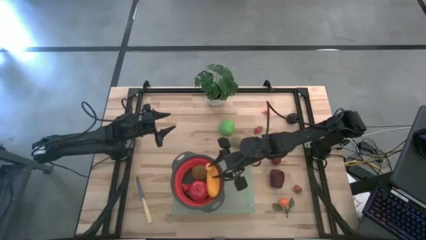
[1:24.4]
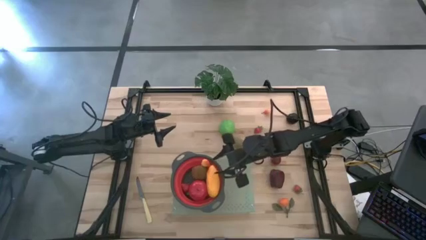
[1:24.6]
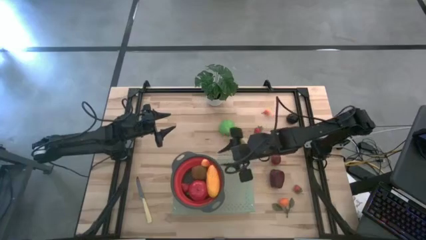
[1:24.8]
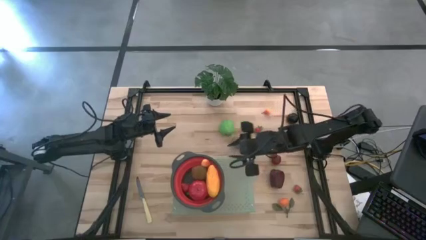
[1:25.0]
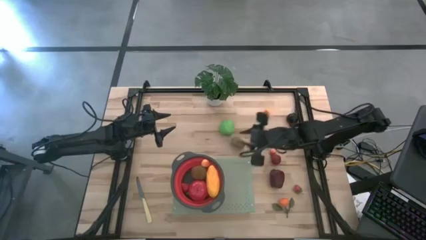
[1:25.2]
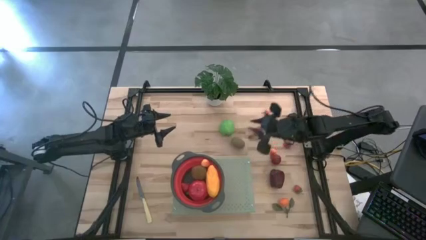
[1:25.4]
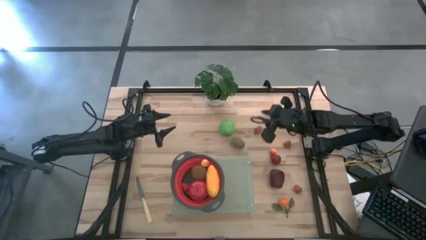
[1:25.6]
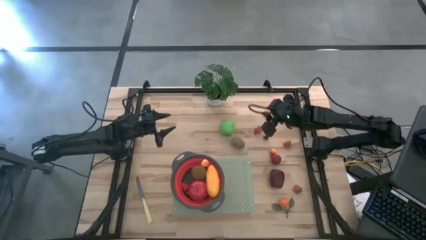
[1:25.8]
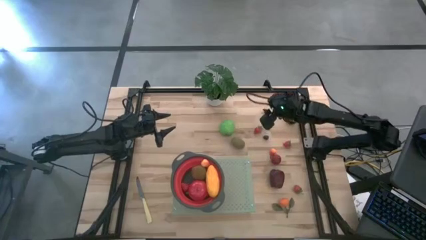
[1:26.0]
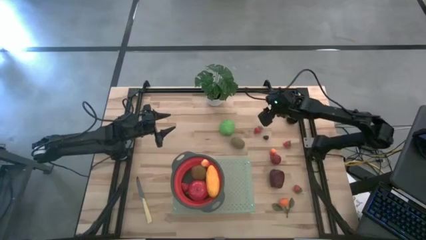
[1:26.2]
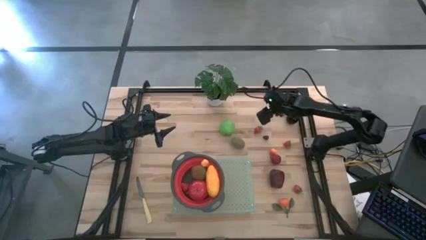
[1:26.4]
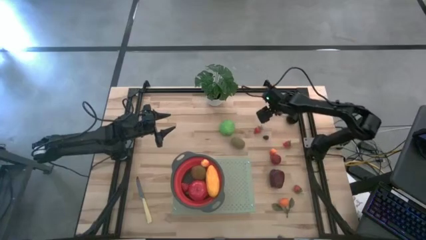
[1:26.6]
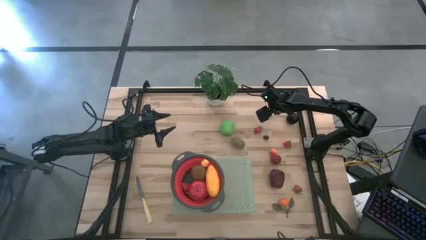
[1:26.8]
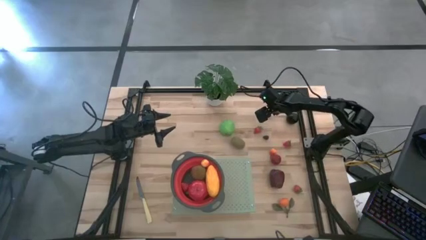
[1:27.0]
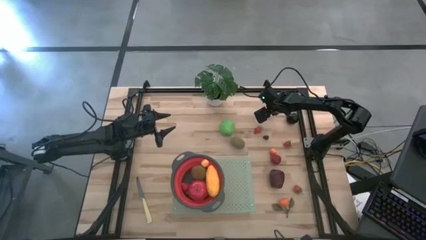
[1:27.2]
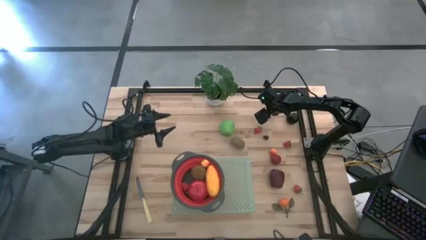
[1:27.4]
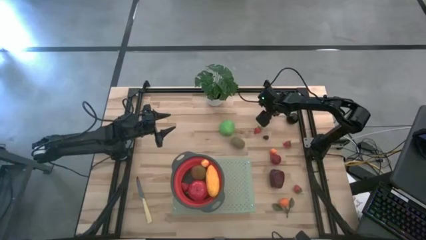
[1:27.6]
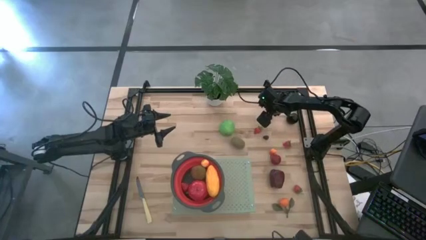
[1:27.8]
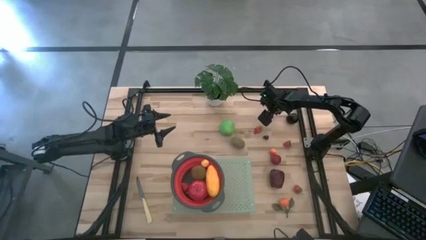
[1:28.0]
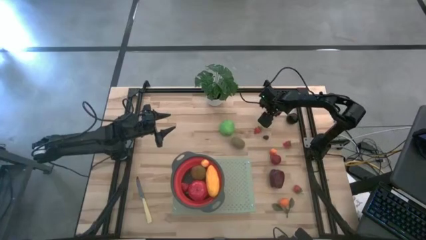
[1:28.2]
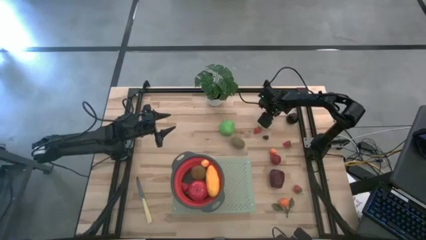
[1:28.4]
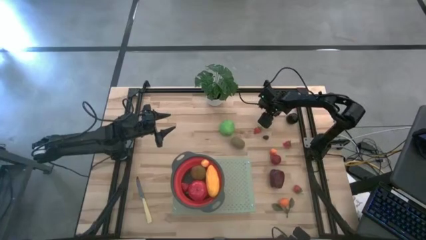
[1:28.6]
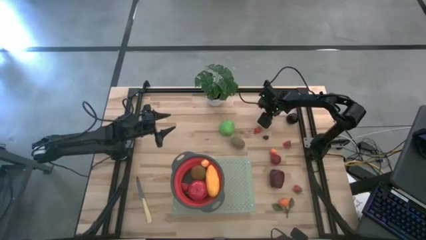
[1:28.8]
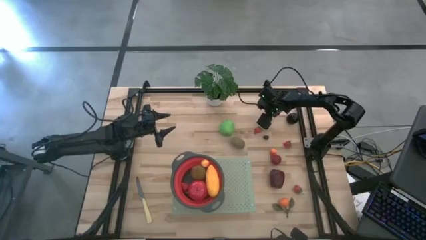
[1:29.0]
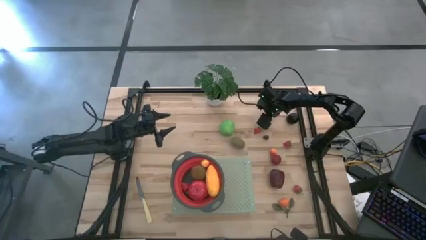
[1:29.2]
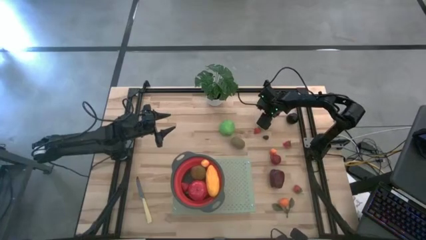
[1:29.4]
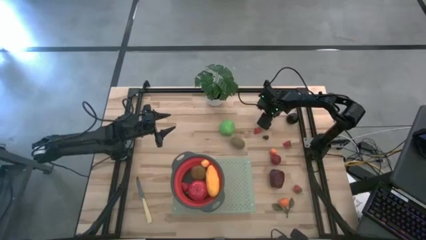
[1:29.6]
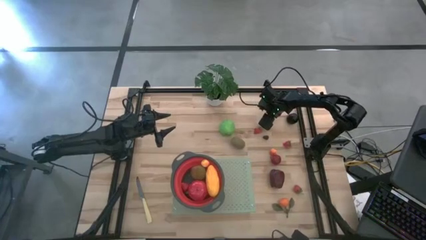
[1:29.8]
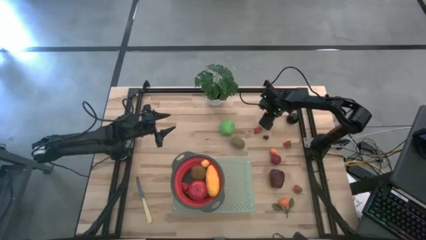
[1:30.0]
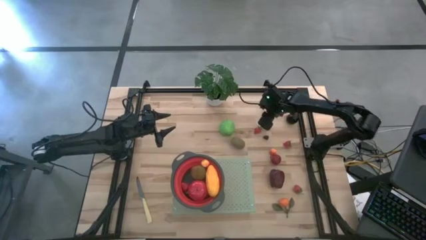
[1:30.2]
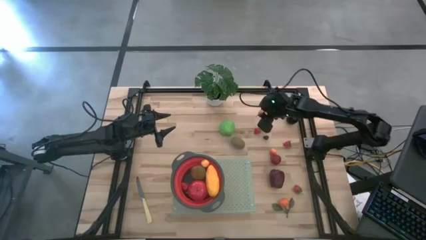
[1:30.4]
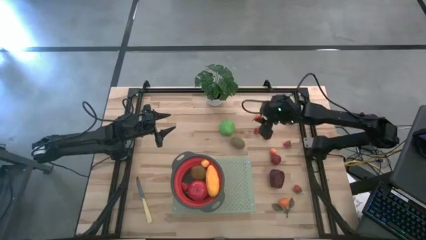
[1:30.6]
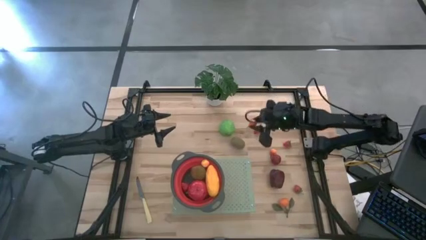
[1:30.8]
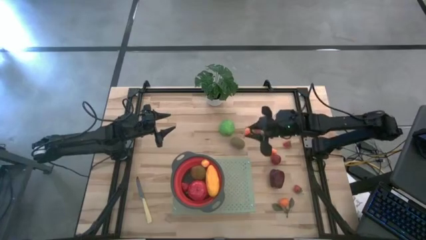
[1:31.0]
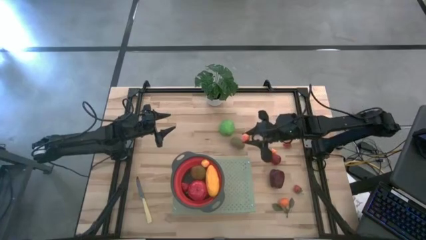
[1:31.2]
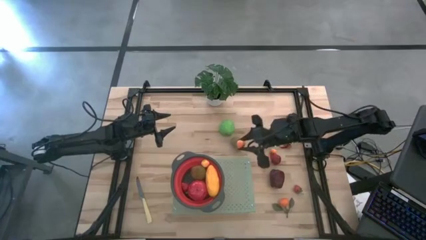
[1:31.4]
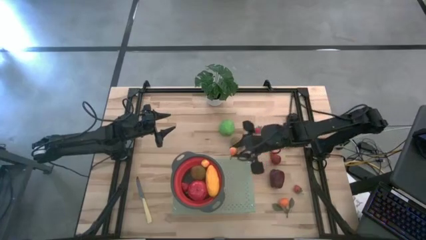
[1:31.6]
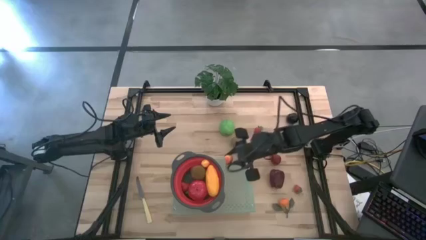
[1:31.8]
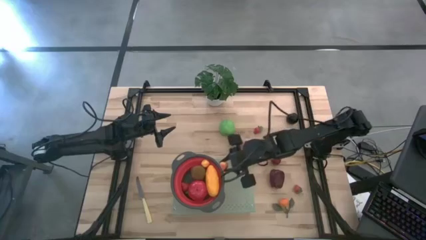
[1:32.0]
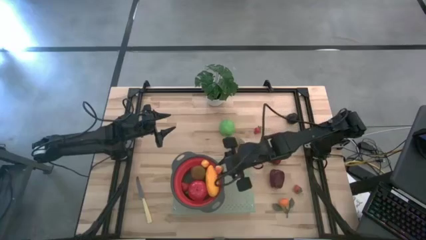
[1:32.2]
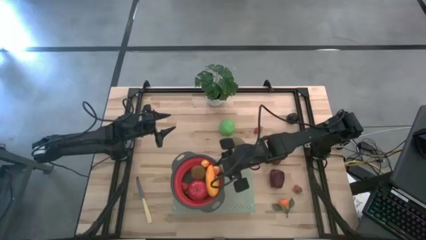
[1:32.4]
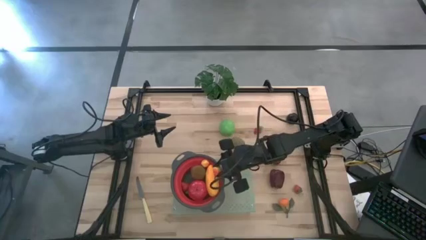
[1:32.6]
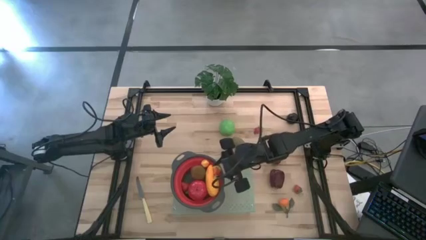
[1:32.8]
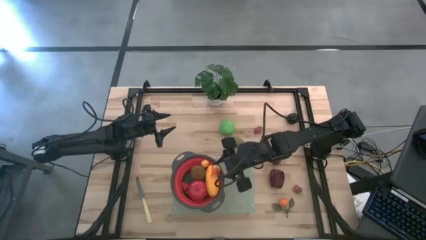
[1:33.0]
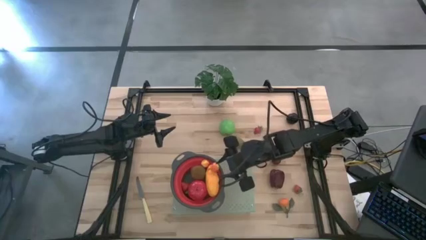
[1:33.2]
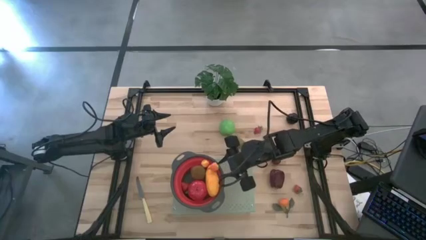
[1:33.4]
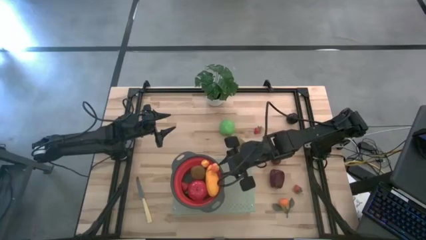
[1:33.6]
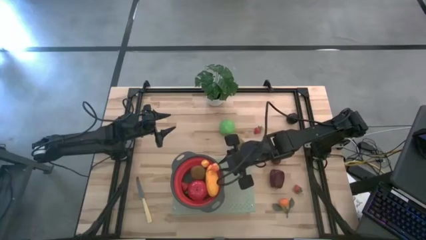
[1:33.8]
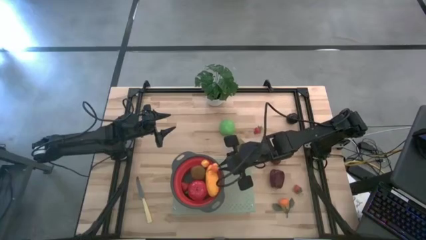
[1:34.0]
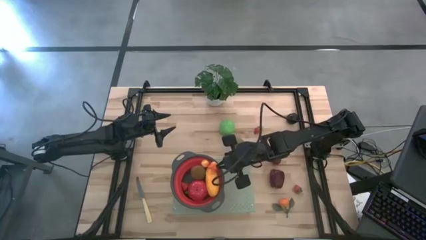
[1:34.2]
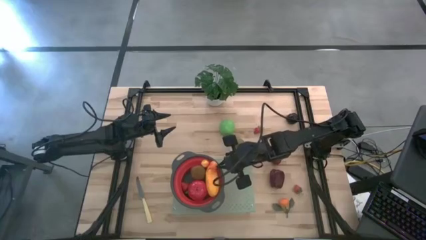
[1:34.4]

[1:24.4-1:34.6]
Task: Pick & Place Fruit
Put the pear into the red strainer

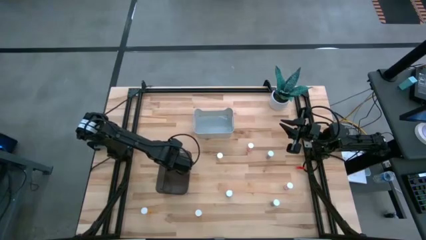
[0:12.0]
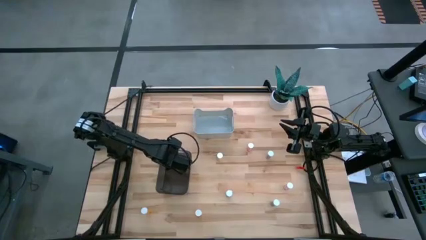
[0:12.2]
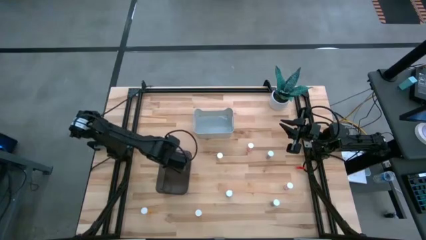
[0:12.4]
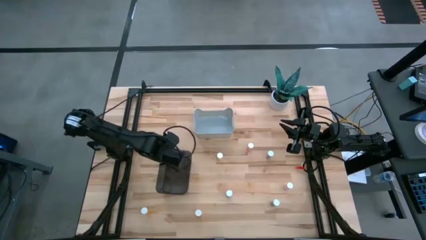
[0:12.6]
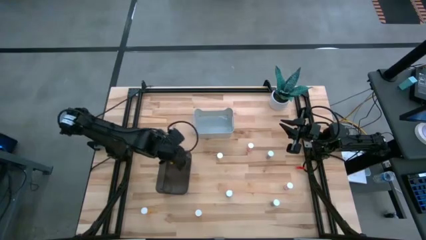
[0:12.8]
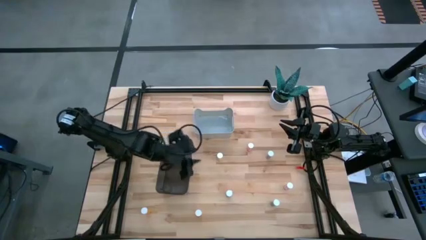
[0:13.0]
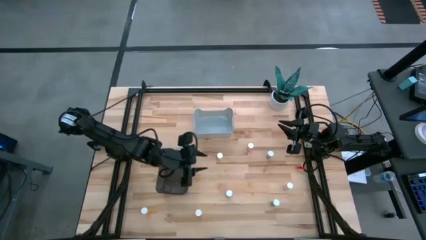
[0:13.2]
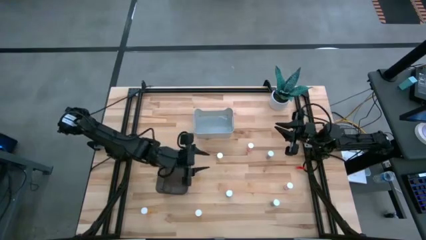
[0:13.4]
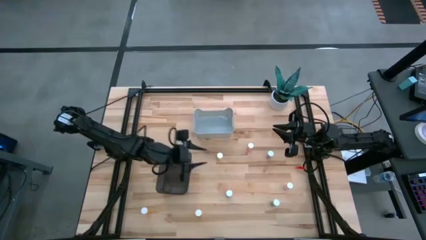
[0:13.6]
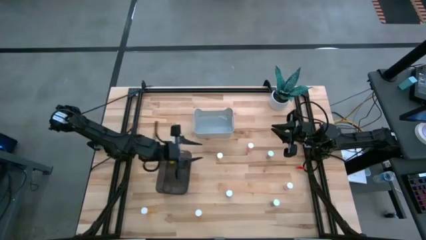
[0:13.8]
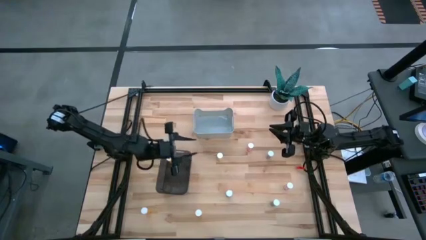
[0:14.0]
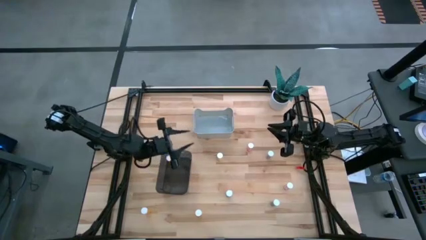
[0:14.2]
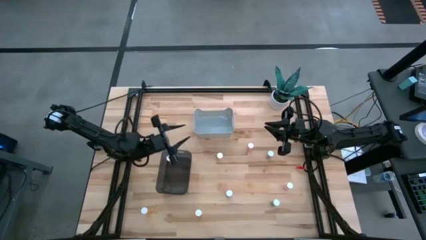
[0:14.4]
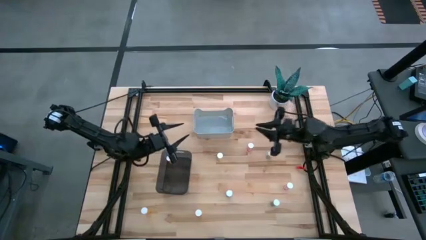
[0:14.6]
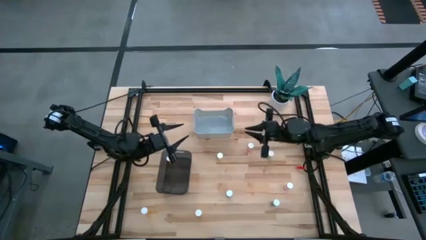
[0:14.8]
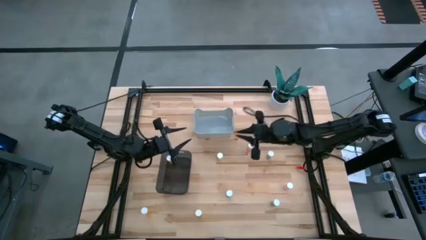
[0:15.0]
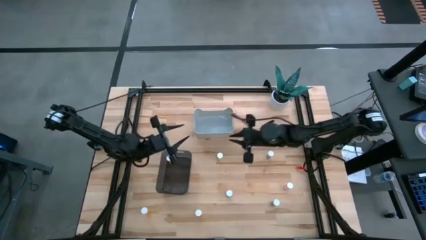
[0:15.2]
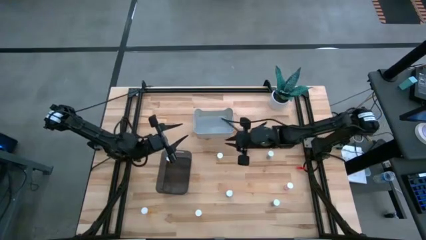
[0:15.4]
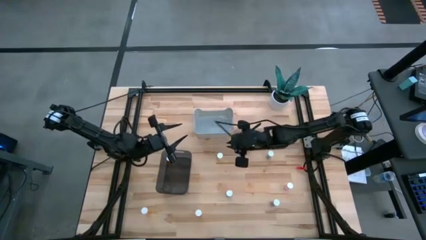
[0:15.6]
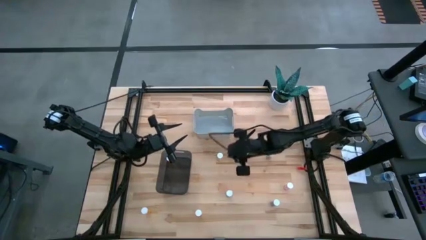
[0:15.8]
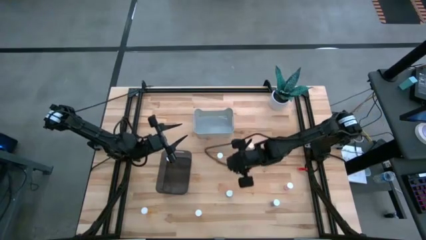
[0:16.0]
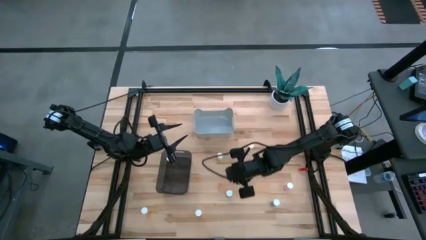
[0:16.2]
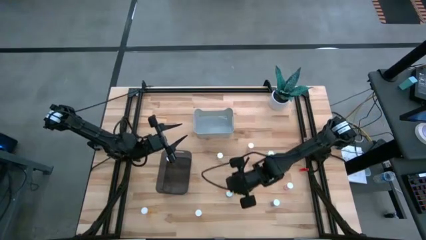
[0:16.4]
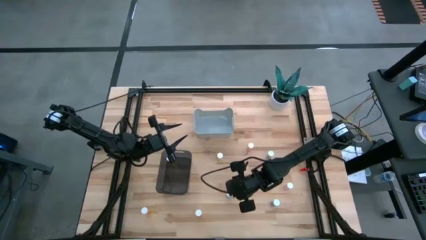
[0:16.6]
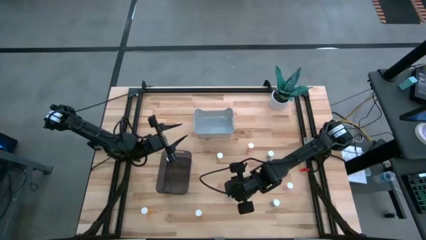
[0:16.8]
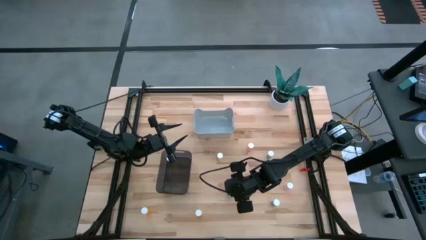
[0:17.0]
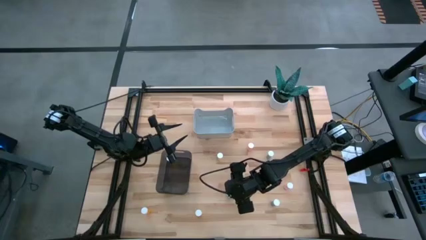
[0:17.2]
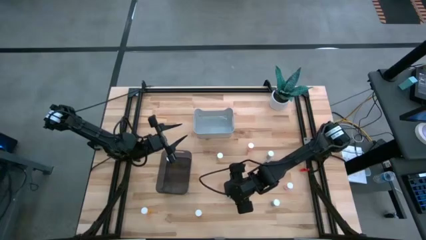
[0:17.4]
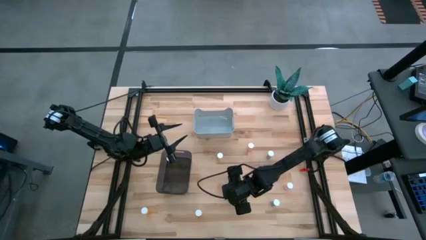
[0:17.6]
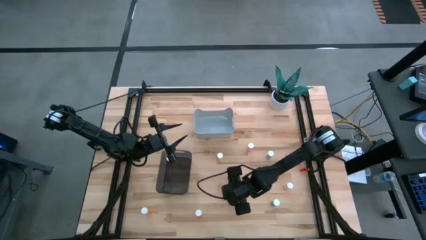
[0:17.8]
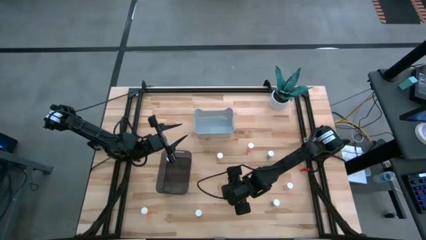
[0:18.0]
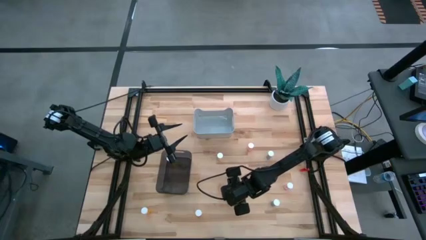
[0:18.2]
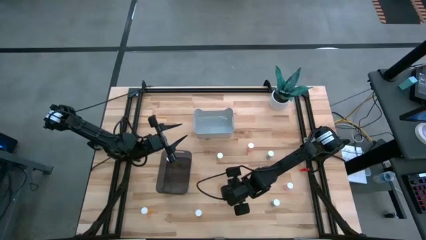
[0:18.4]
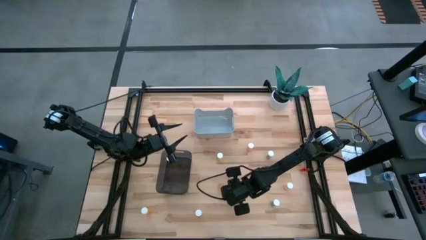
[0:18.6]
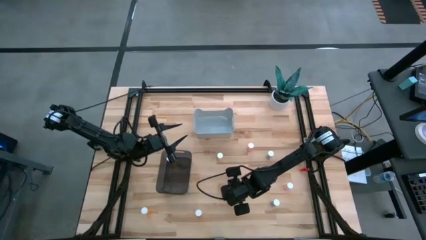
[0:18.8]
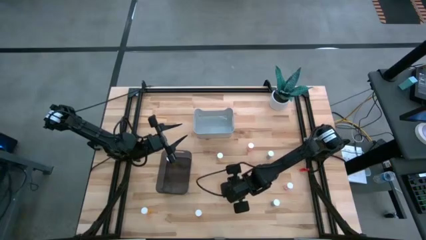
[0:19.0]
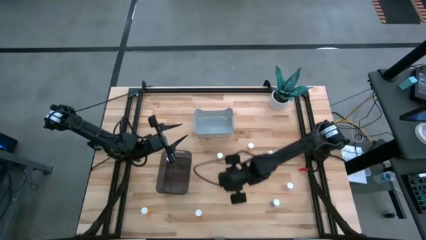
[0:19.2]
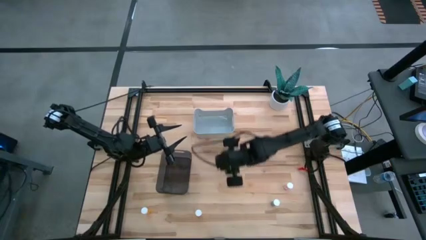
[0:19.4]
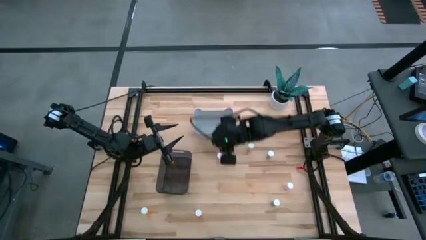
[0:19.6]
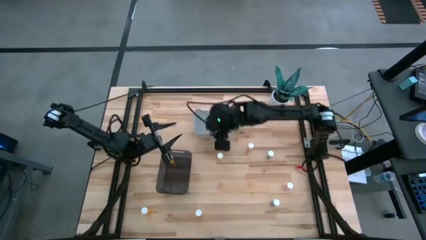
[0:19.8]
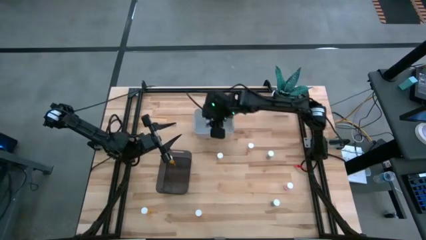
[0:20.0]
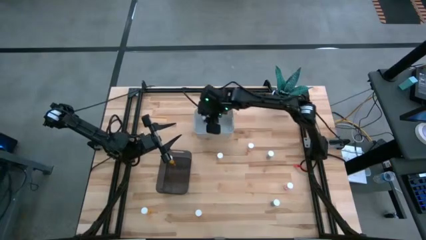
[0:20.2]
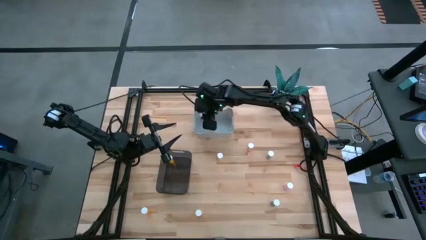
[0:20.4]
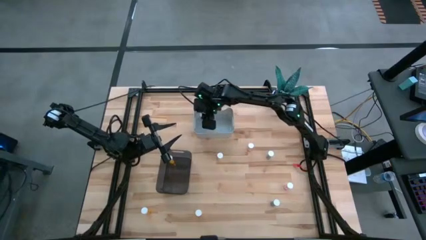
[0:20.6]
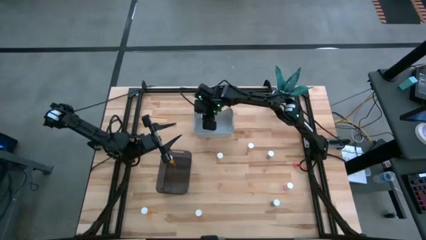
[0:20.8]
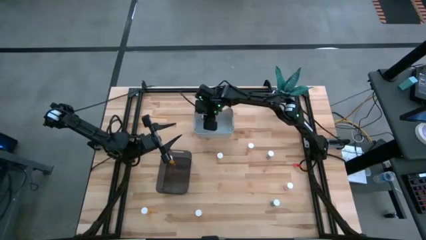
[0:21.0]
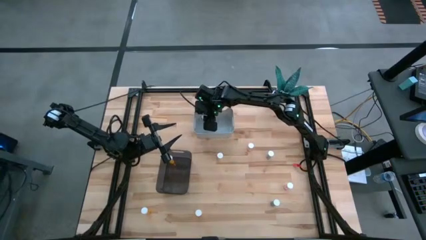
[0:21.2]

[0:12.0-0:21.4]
Task: Pick and place medicine bottles into bin by pill shape (circle, oval)
Put the top blue capsule bottle into the gray bin
